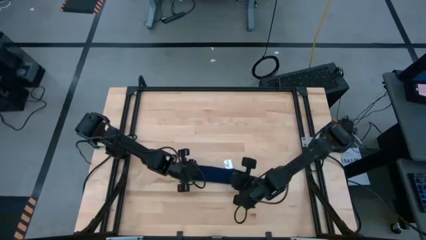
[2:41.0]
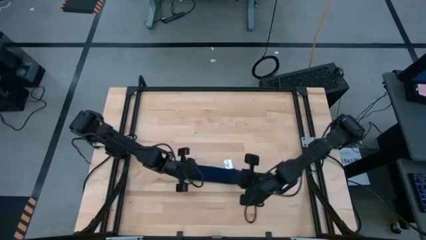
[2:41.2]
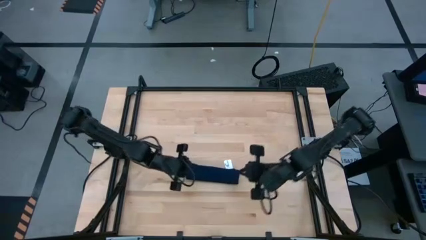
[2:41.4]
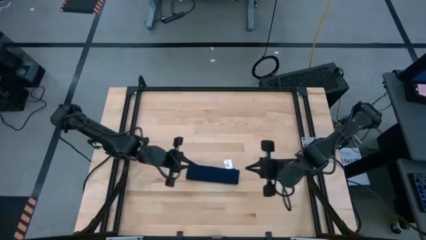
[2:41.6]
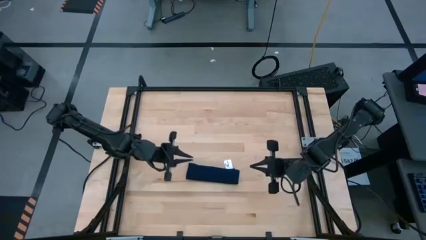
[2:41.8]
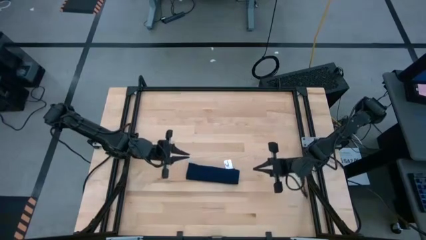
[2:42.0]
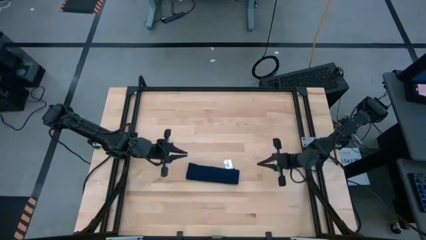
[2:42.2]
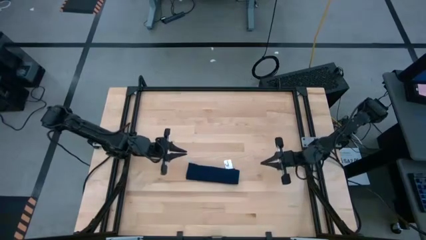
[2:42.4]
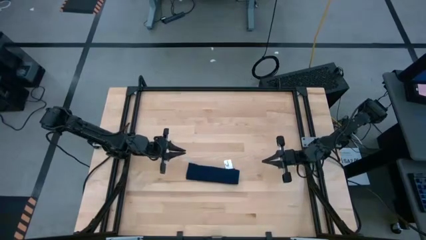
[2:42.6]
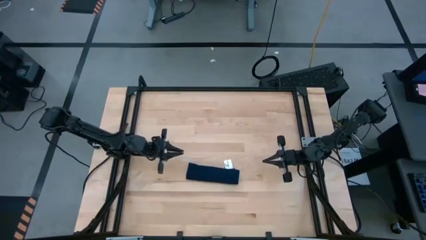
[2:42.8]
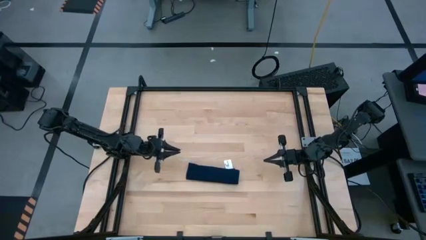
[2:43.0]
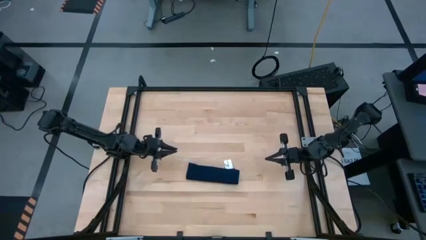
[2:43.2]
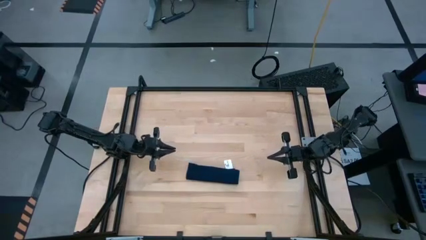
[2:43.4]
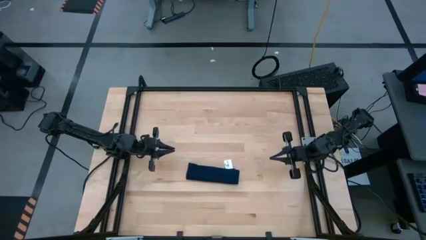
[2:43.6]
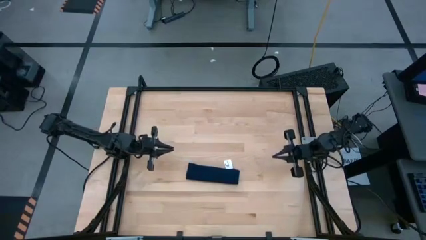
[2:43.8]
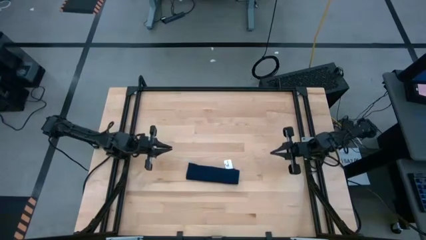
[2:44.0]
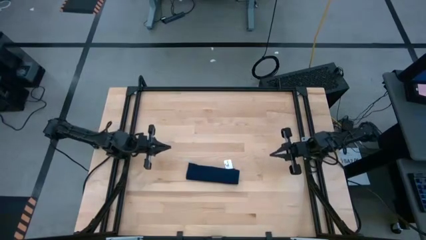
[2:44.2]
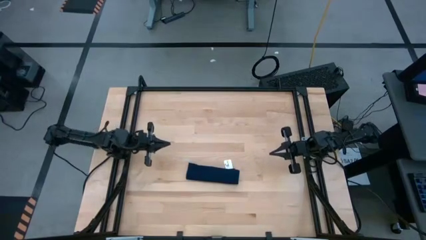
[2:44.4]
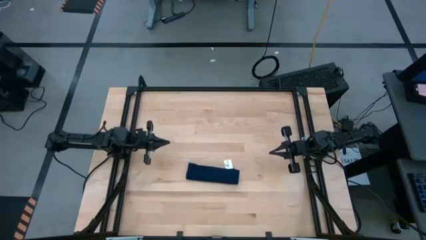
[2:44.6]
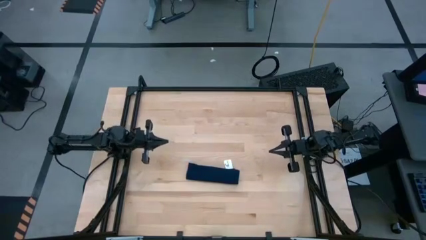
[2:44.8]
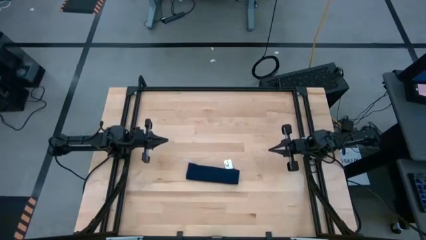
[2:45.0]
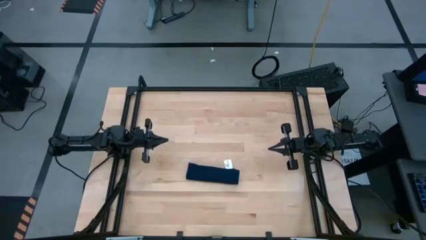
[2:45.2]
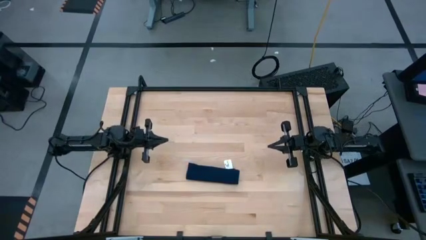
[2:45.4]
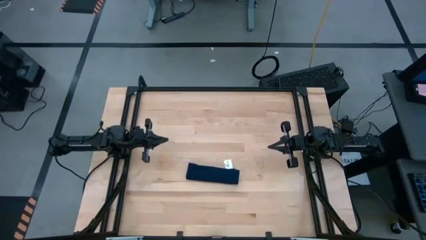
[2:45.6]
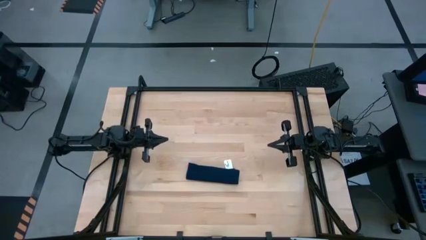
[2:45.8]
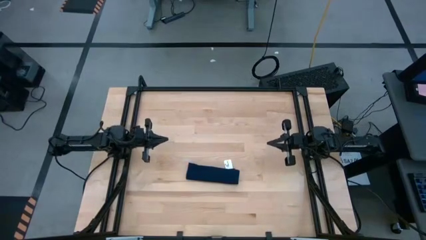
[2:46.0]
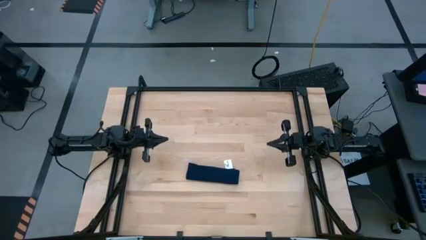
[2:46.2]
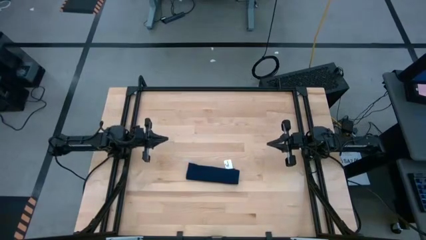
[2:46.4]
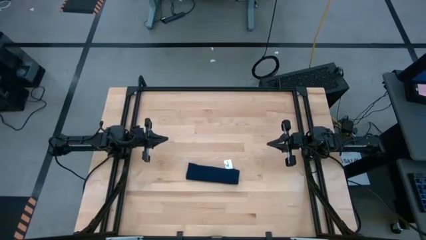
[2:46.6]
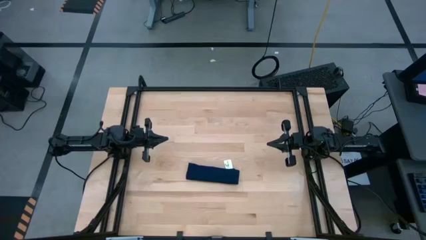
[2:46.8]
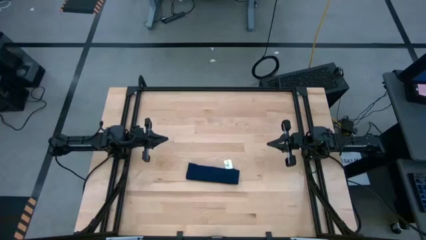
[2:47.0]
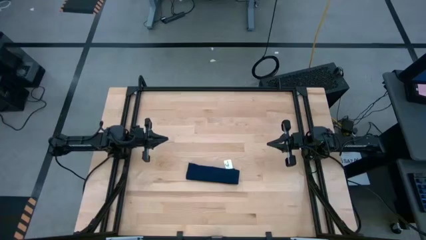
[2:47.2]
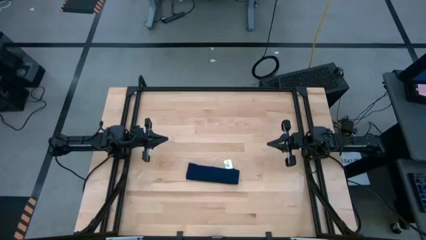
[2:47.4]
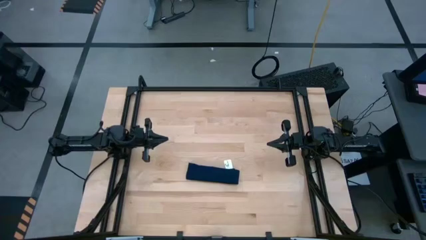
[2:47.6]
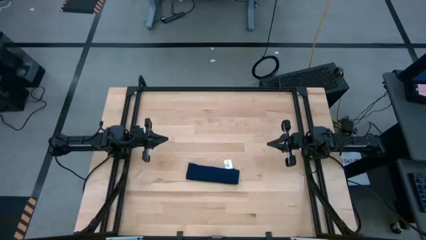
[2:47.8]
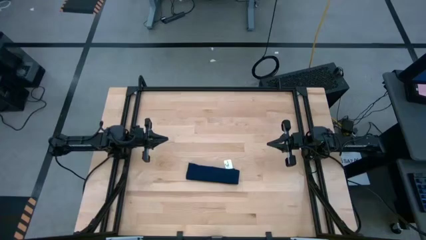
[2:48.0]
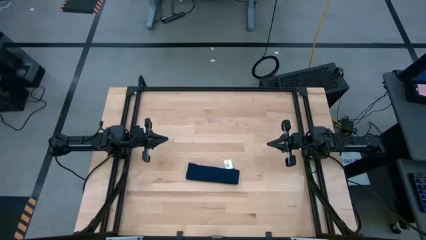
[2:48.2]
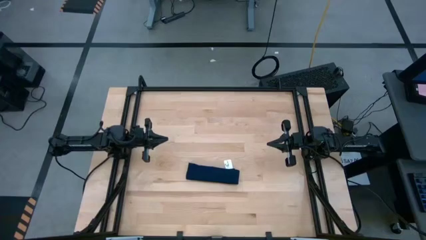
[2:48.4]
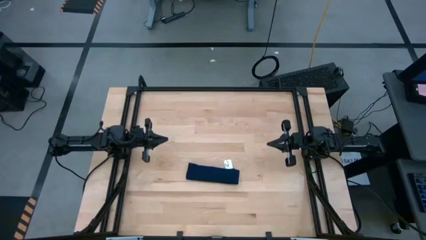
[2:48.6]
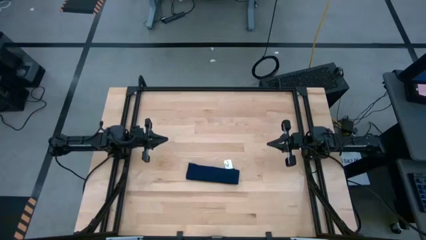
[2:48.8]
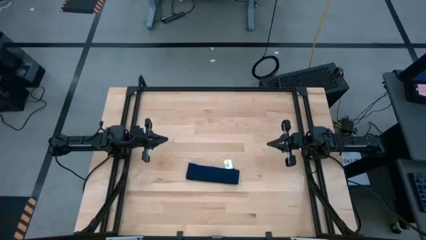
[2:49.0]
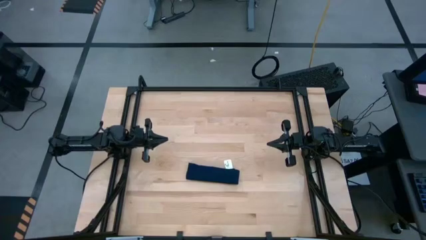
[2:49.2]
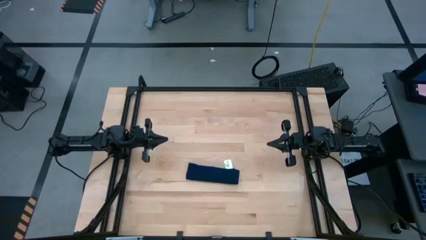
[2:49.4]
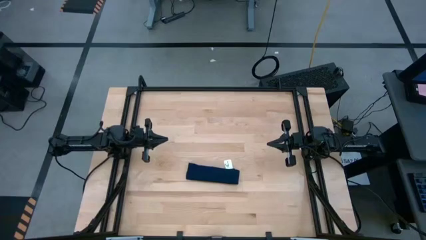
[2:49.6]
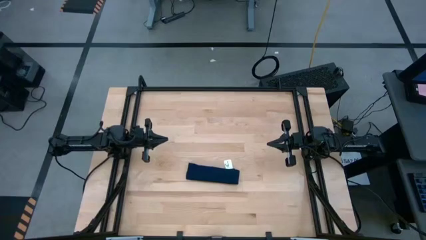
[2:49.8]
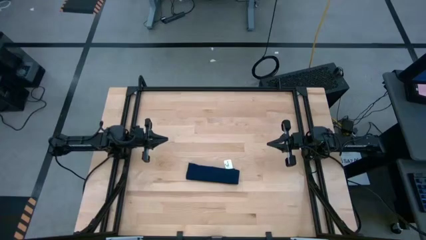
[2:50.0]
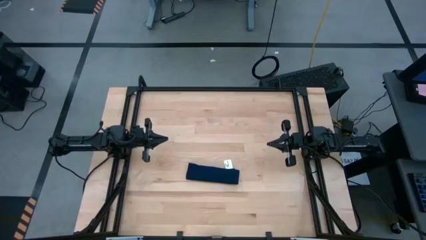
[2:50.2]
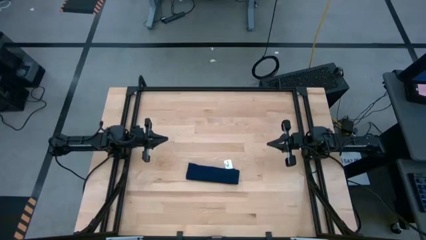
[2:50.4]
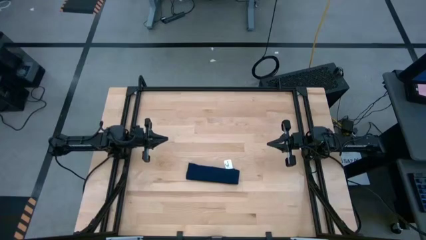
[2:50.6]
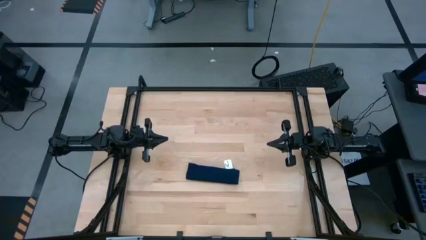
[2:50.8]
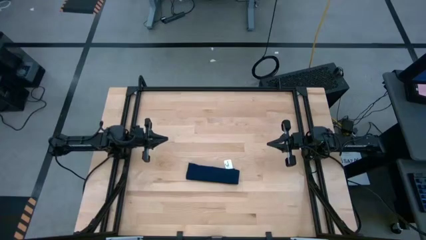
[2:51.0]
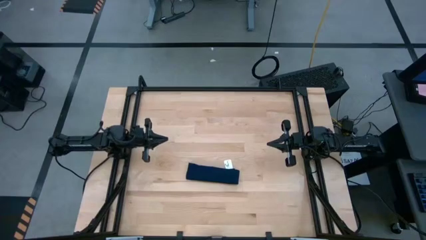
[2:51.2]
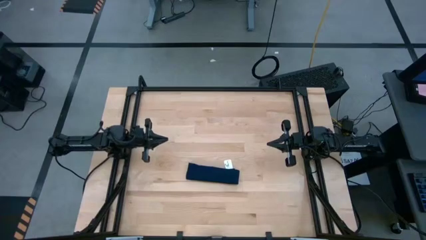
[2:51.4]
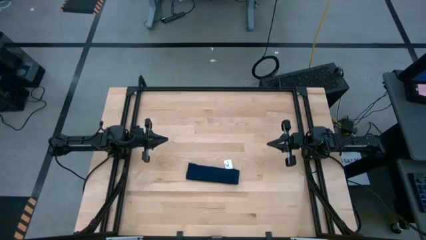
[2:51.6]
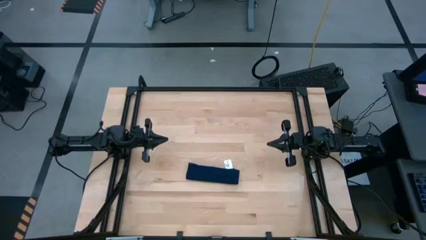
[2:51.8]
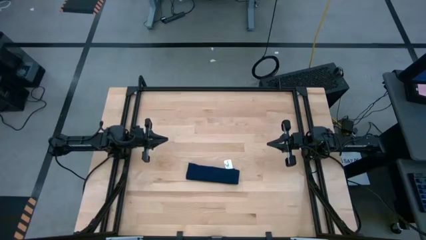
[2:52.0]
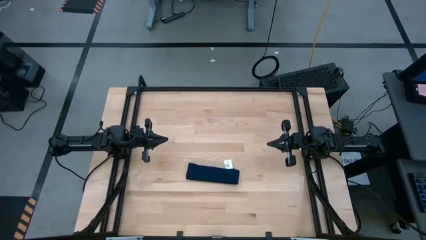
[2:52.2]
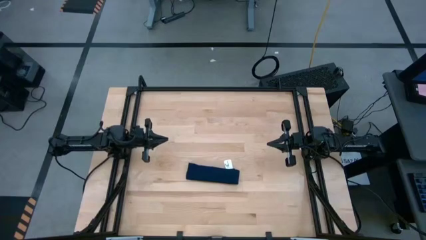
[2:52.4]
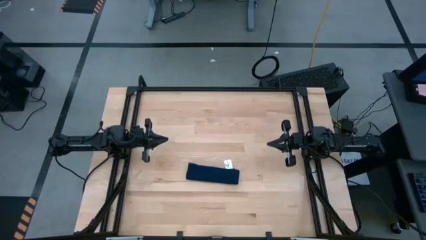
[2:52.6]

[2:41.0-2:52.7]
Task: Roll towel into tight, uniform cylinder
Return to Home Position

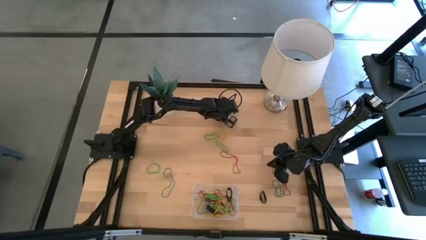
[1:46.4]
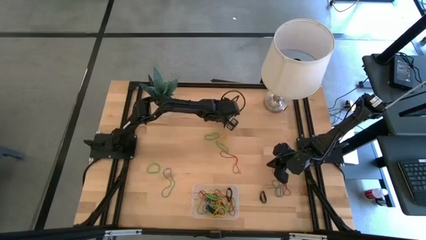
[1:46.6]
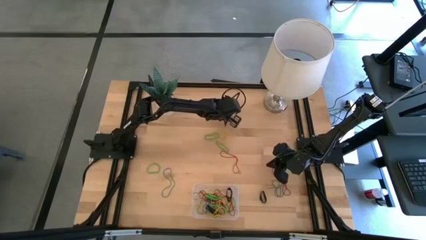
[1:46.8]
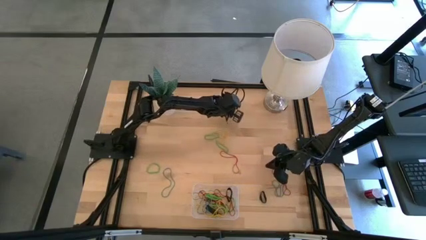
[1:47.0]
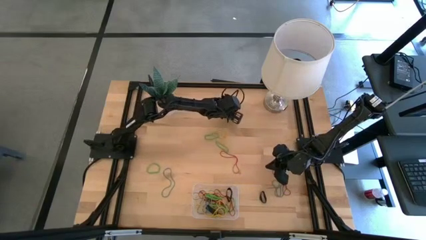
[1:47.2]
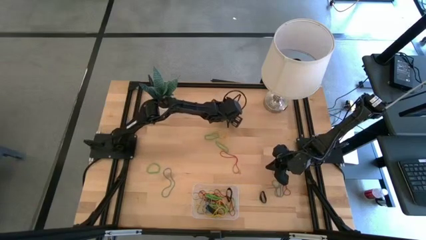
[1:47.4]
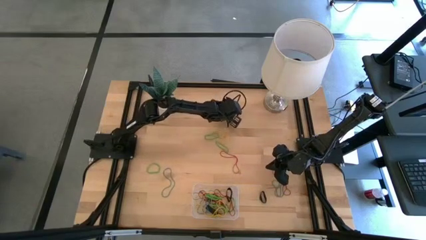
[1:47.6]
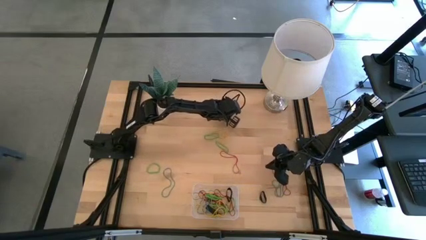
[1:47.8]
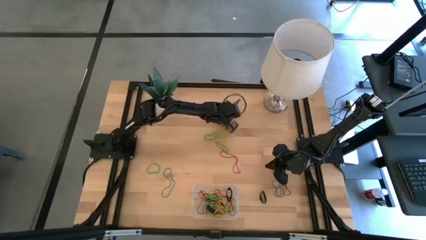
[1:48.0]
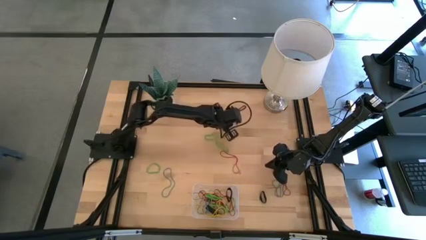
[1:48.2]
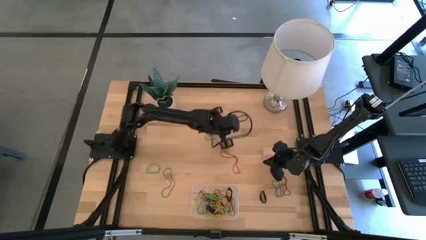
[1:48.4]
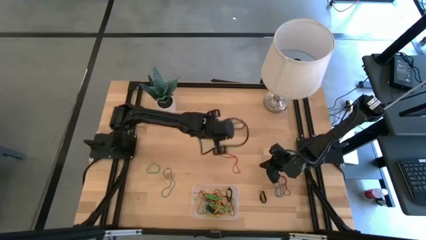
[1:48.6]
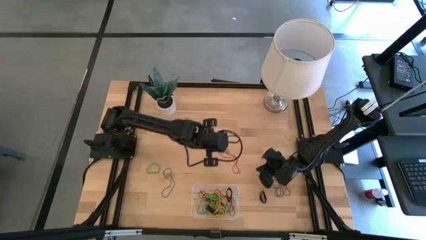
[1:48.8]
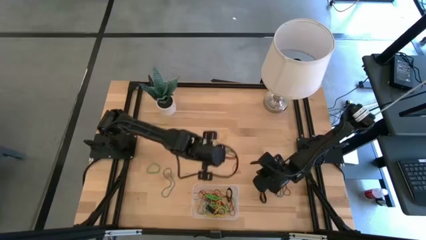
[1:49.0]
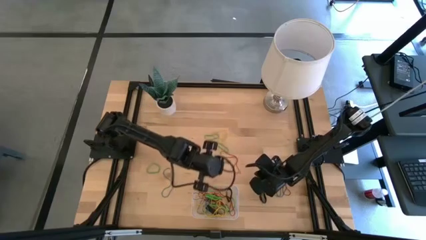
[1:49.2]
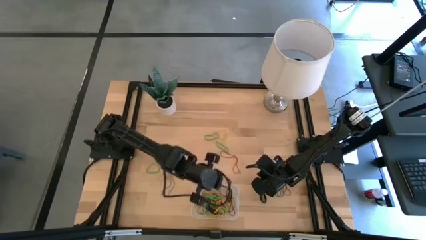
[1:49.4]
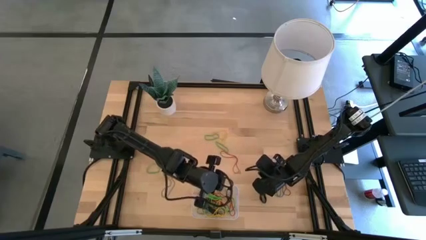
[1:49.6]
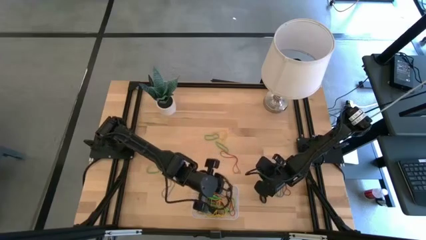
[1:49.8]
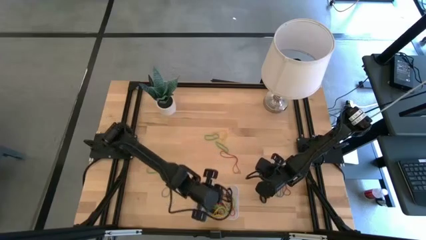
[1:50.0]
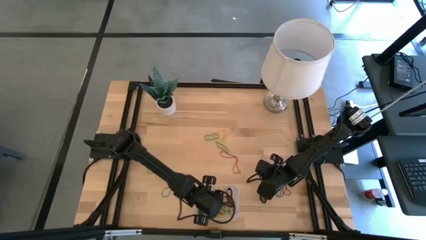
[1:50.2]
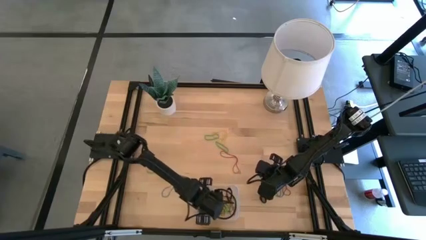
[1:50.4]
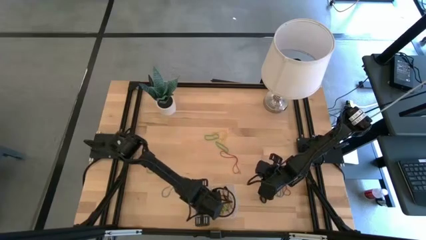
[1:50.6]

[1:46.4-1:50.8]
Task: Pick and place rubber bands into bin
Put the blue rubber band into the transparent bin
